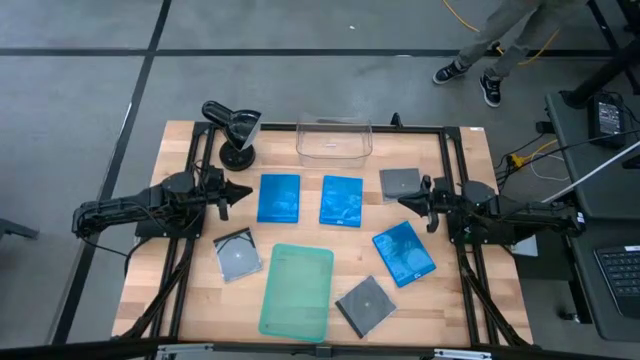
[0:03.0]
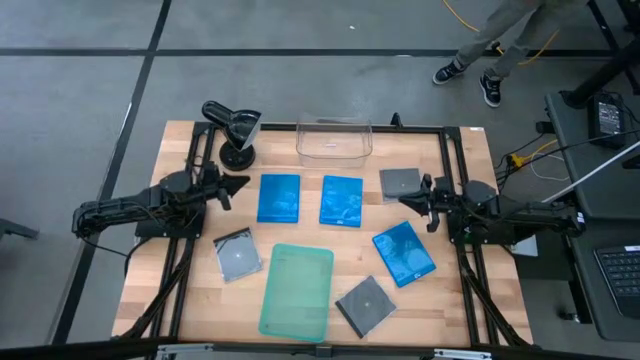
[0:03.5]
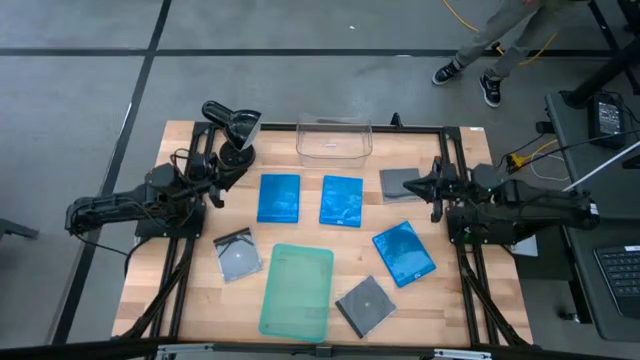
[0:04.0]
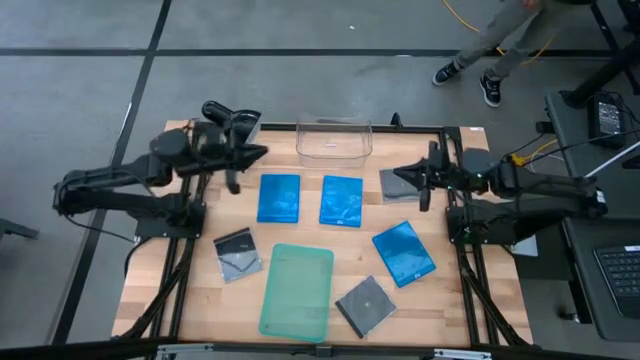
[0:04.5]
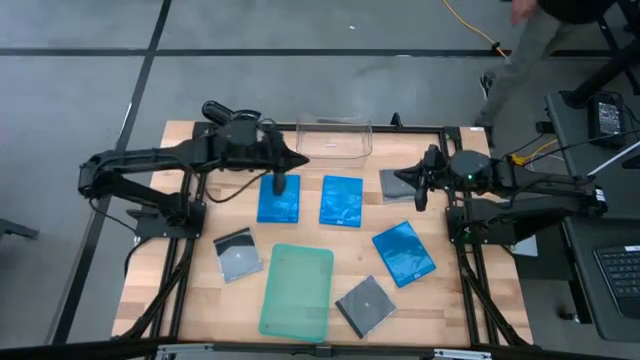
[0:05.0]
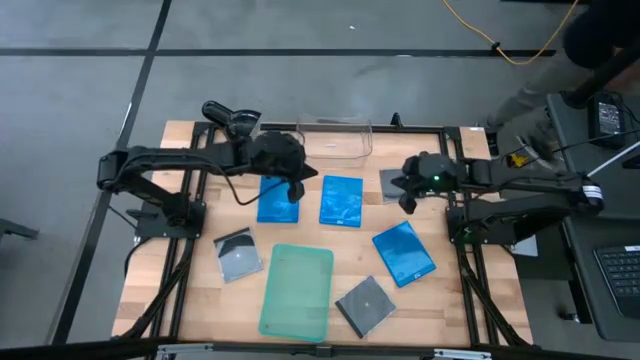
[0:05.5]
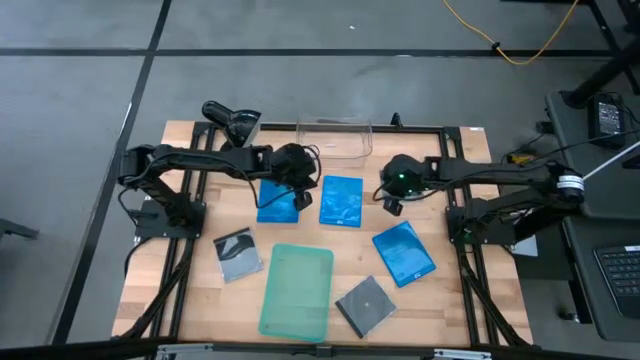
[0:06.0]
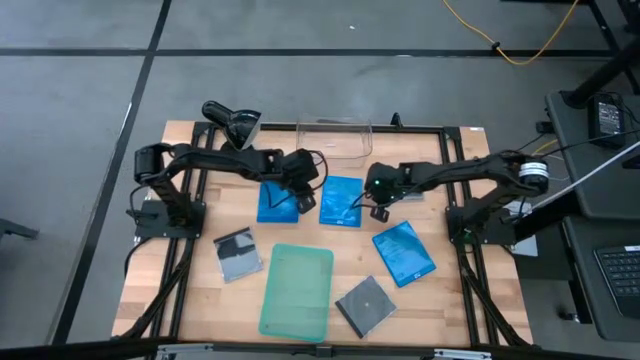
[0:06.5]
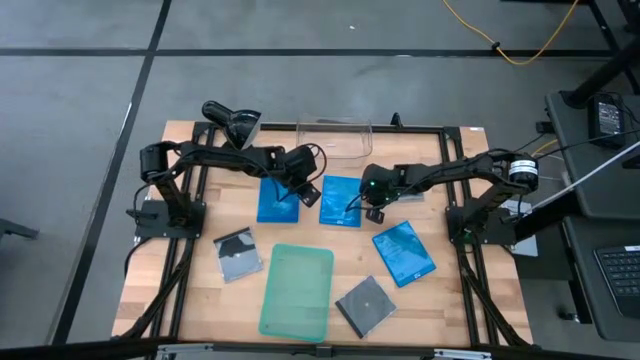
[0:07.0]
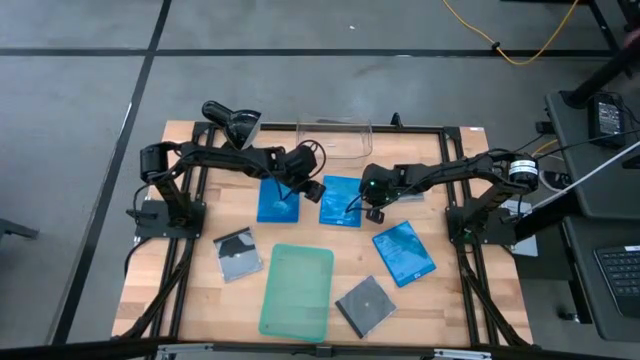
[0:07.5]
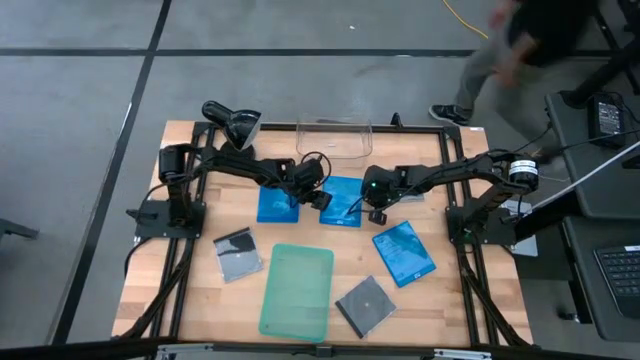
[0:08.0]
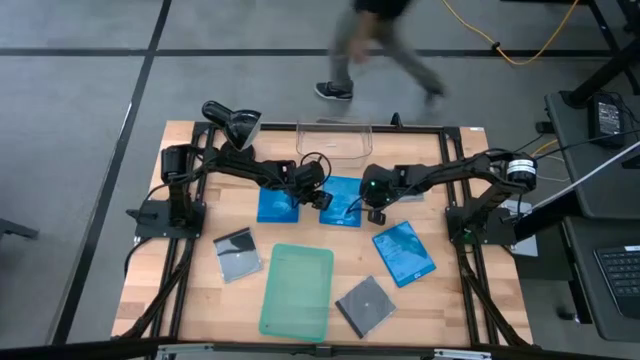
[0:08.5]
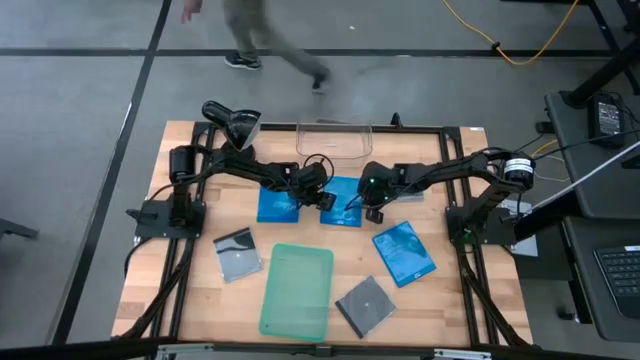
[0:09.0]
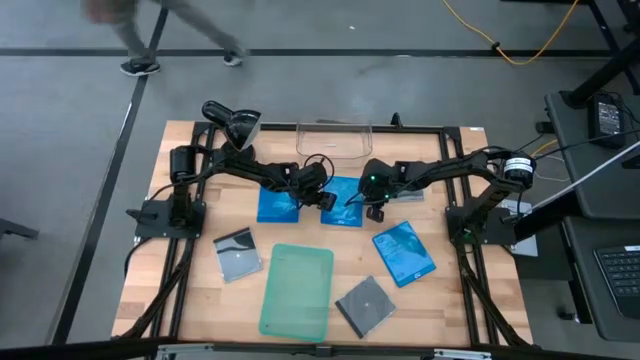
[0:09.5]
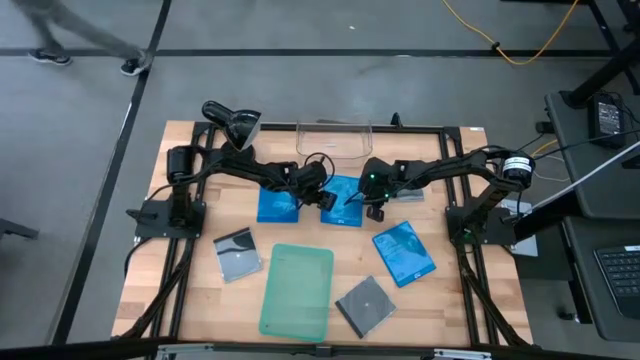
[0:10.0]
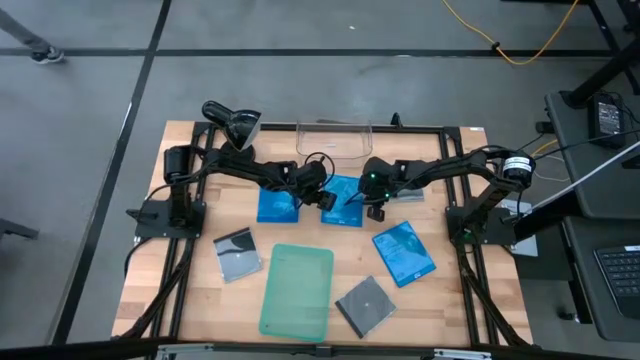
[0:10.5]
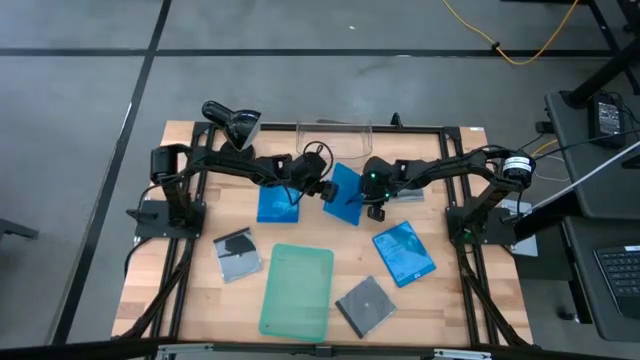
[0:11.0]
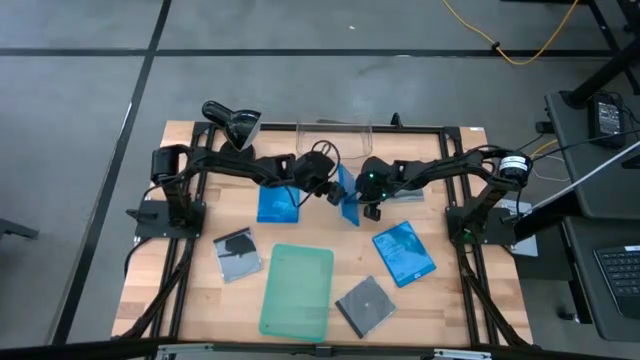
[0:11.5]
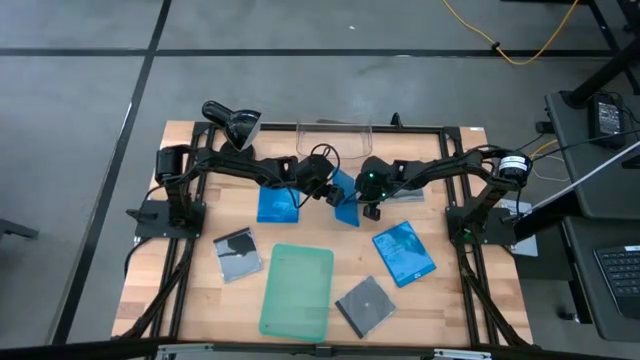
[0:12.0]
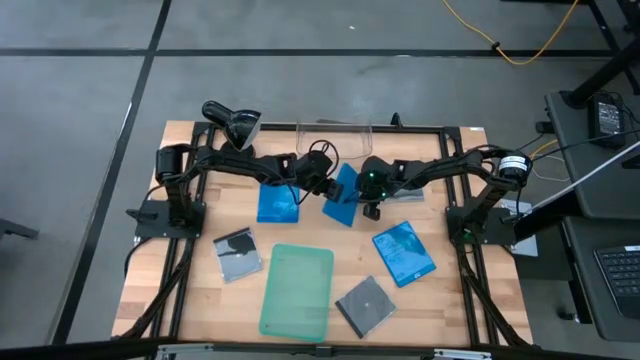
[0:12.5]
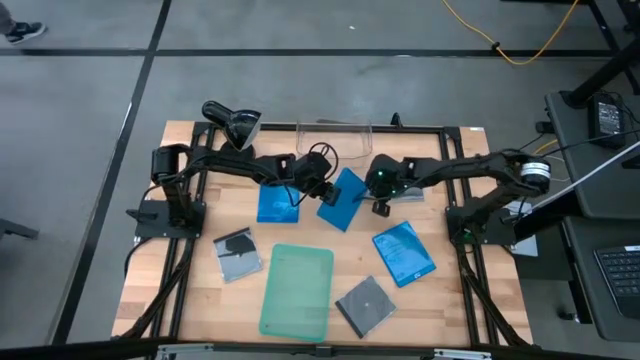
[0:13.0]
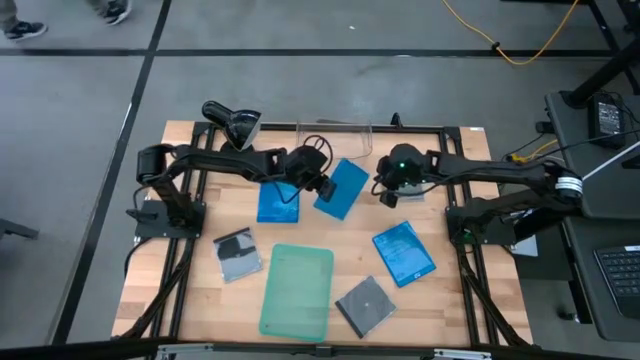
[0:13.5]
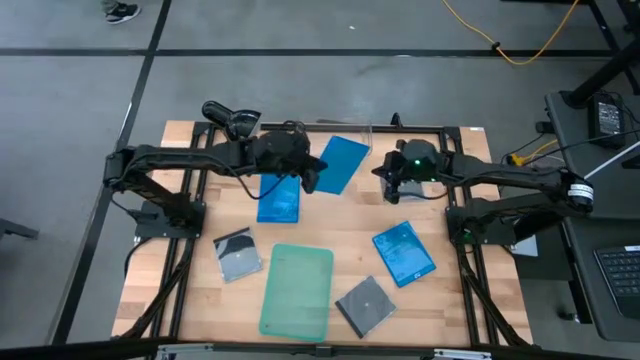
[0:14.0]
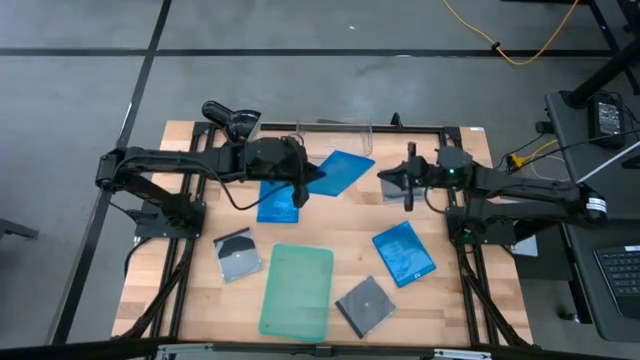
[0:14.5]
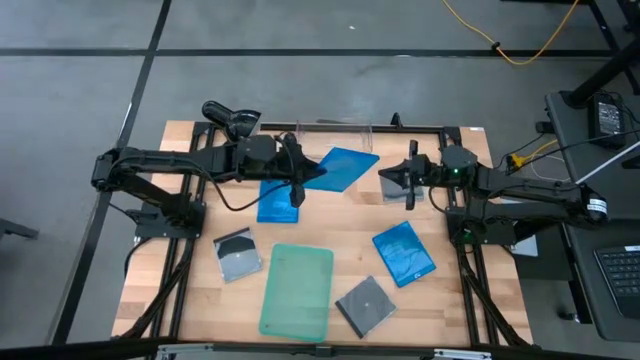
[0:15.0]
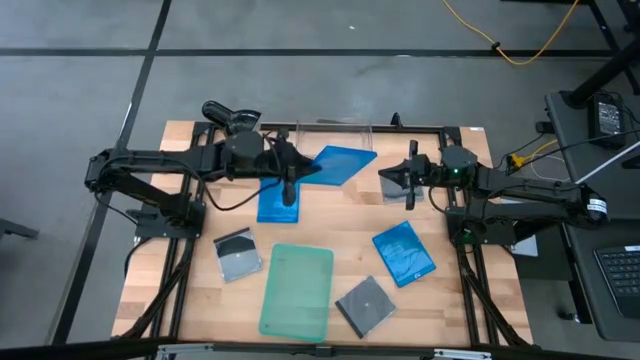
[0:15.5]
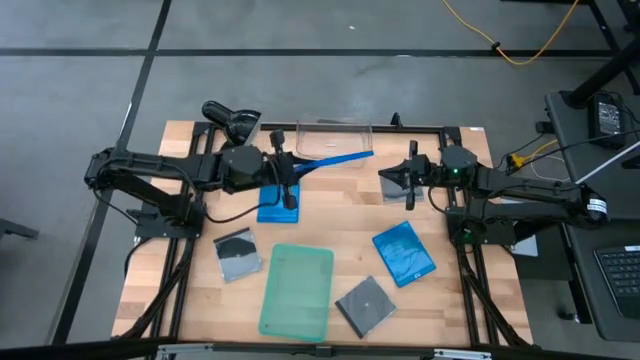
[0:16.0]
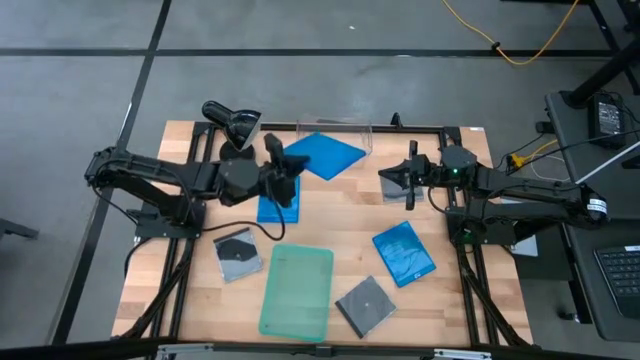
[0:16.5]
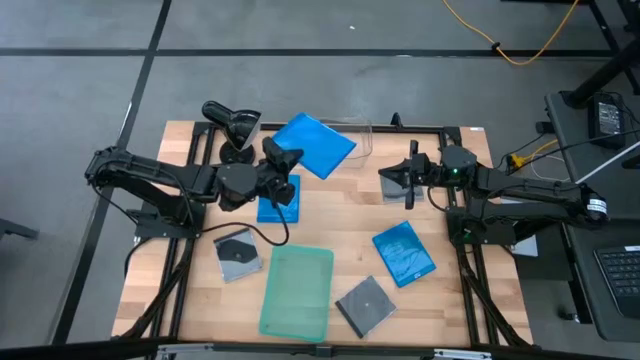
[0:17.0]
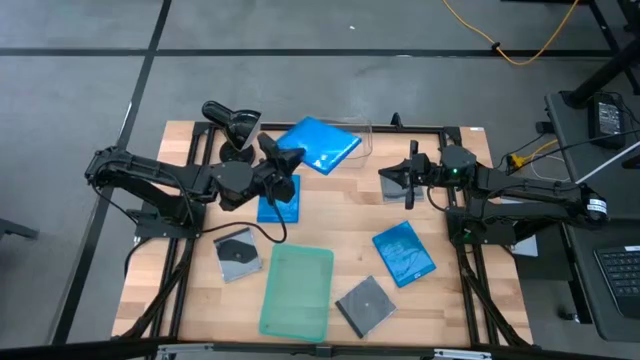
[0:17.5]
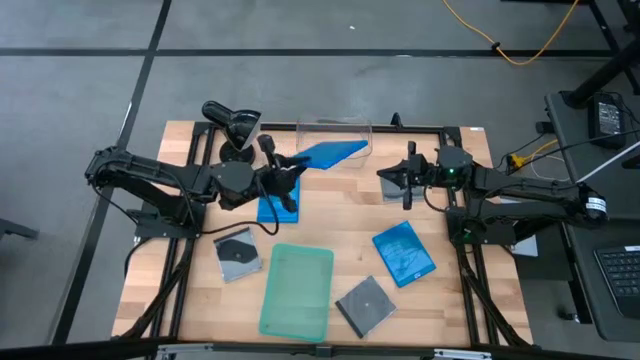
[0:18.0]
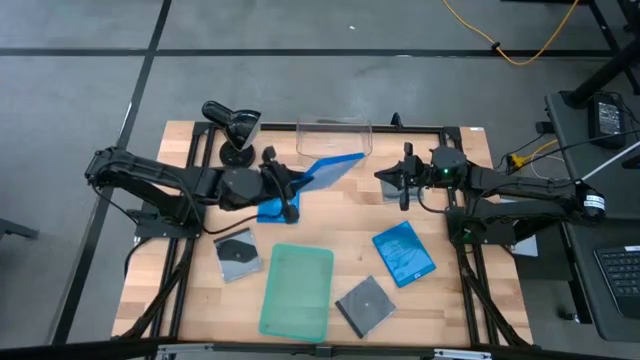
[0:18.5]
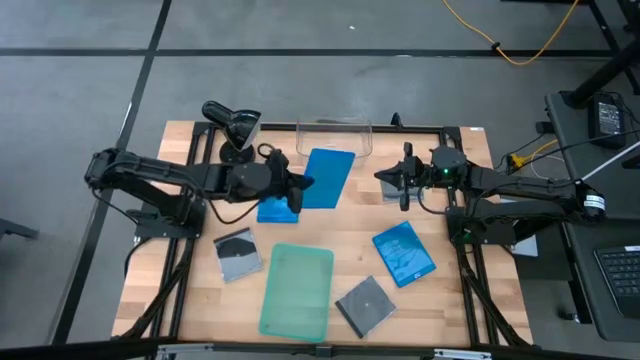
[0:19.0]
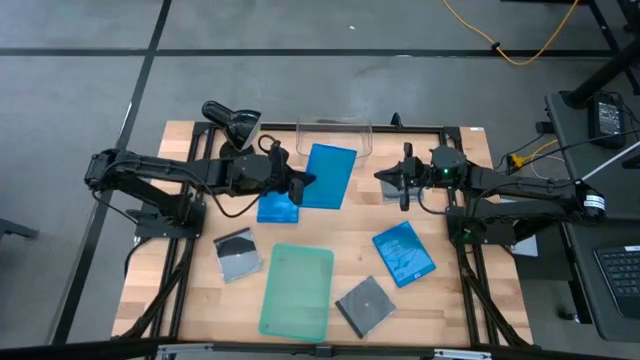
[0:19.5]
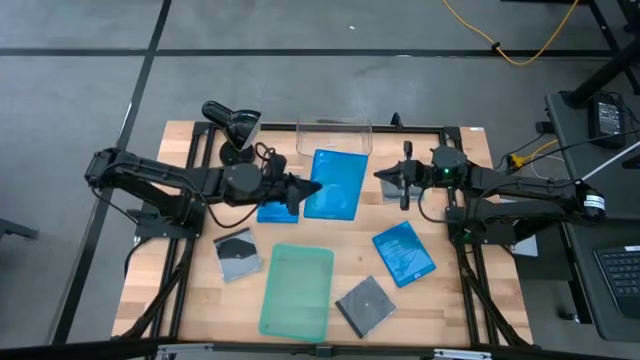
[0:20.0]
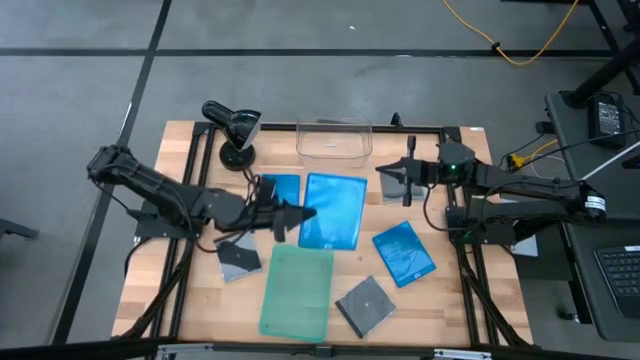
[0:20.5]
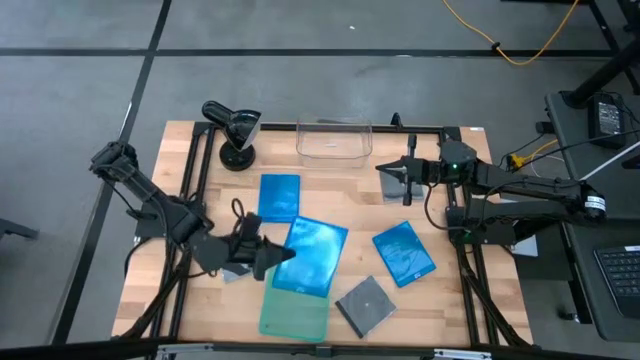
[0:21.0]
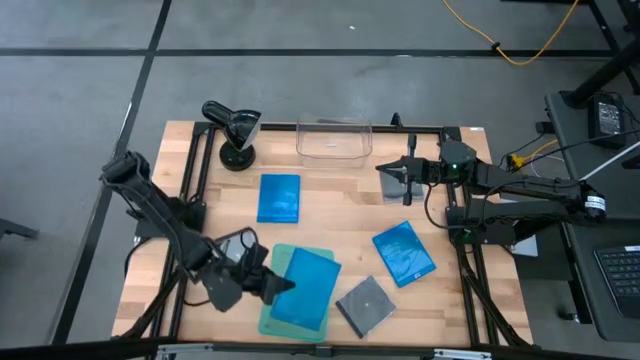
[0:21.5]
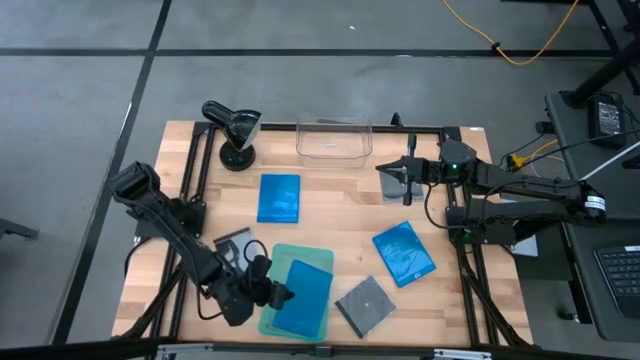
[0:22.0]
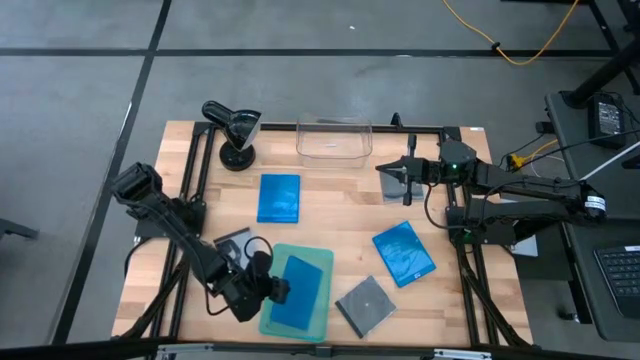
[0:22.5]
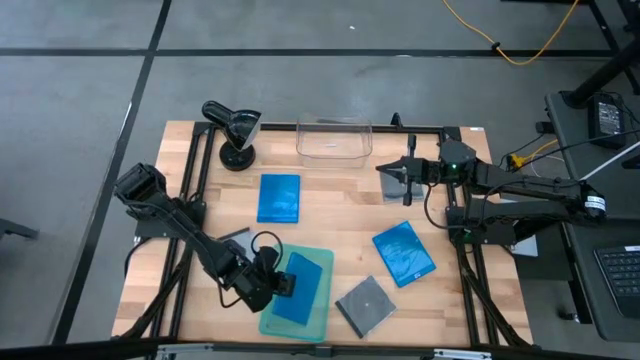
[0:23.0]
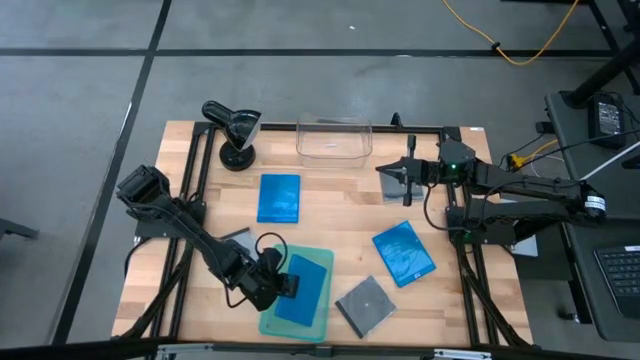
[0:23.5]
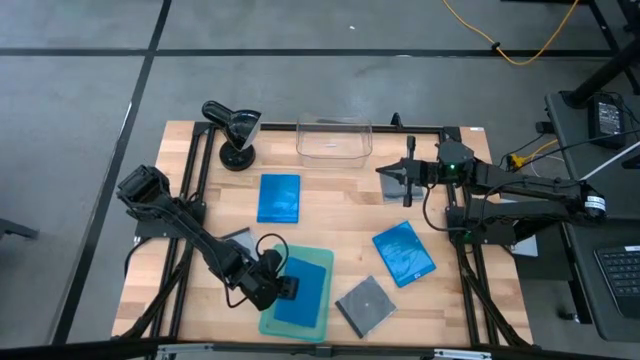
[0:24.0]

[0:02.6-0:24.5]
Task: Pick & place jewel cases by type
Put the top right blue cd case into the green bin
